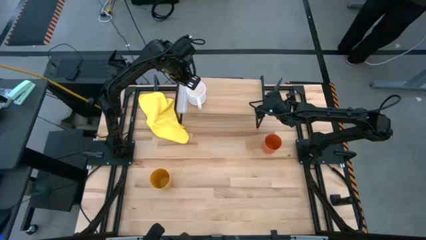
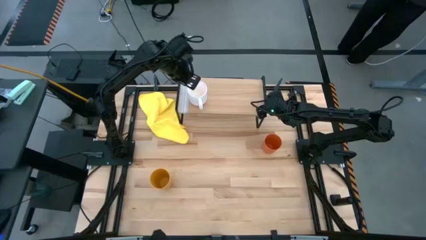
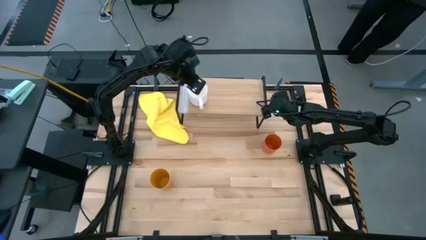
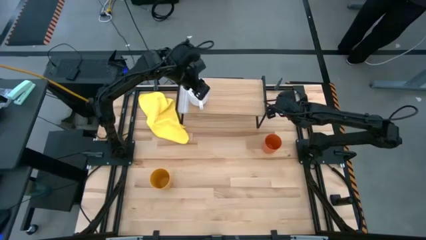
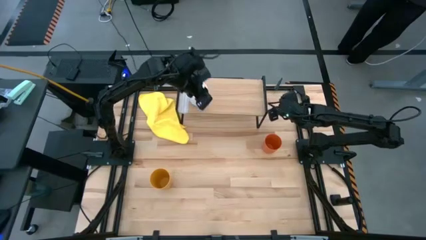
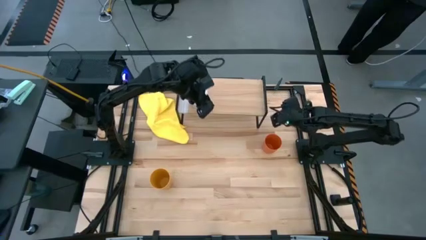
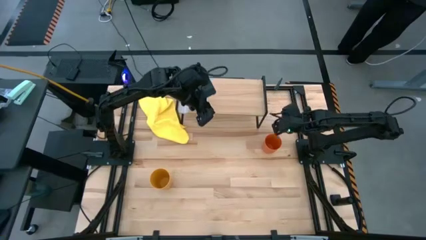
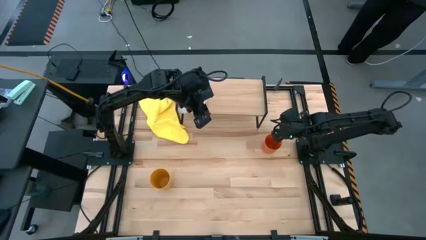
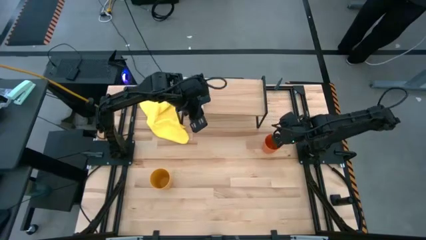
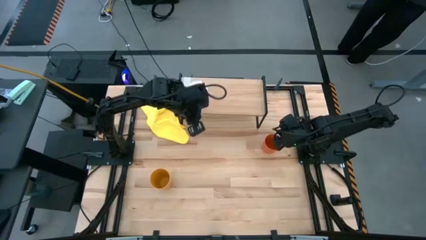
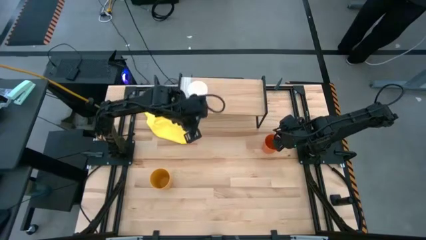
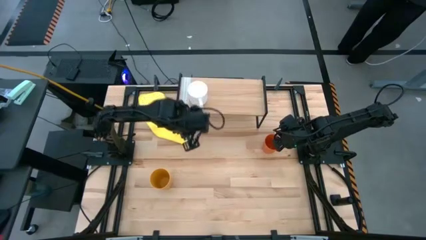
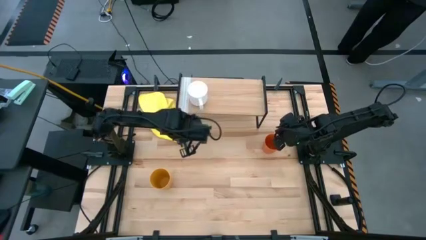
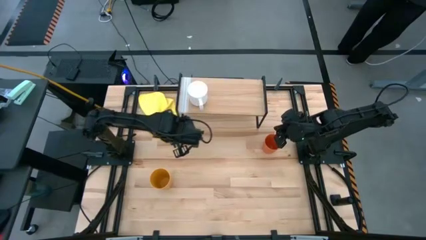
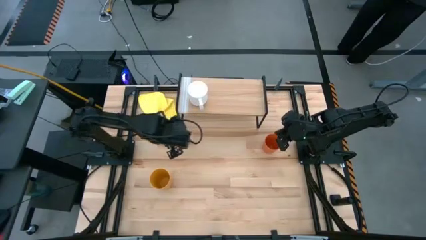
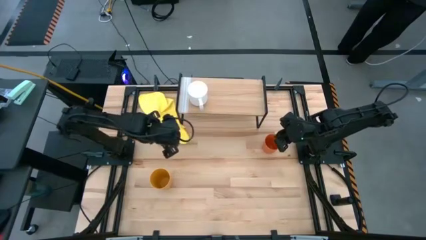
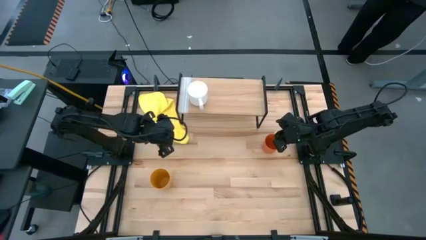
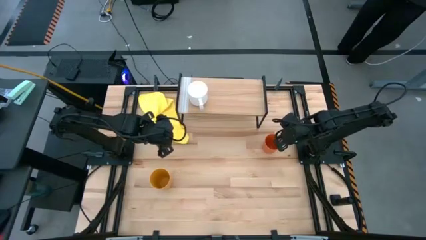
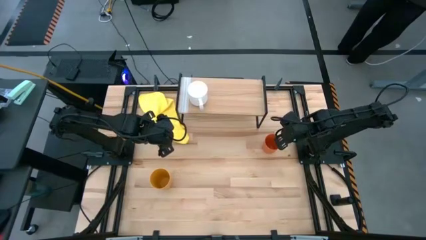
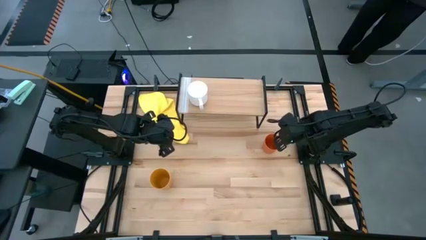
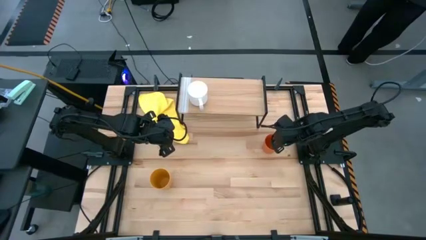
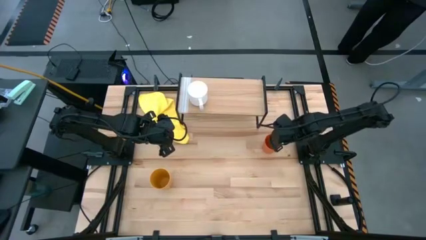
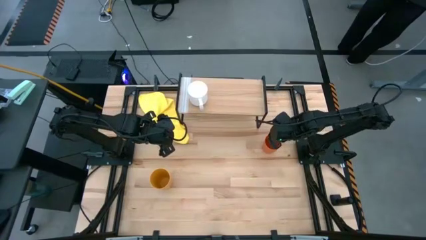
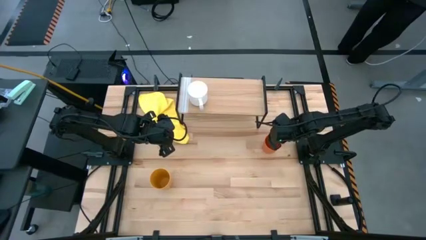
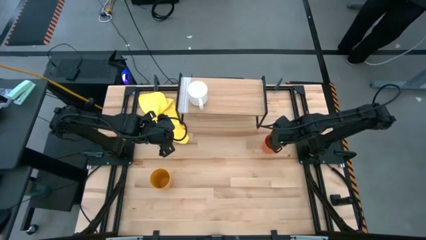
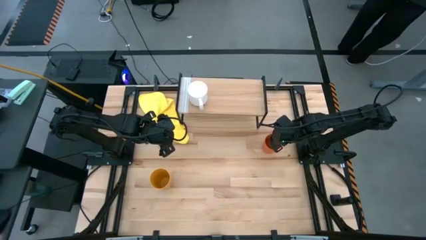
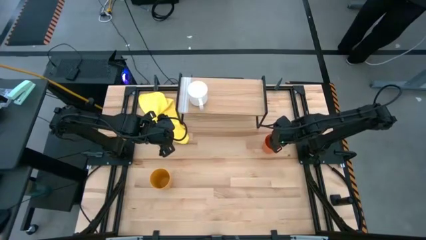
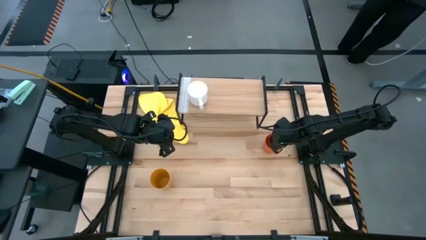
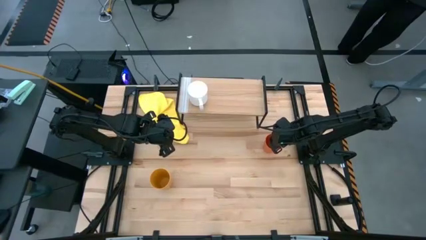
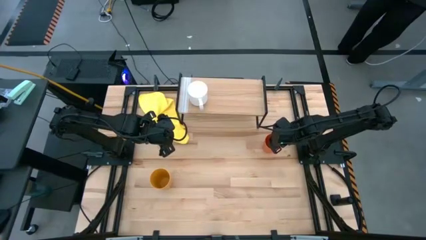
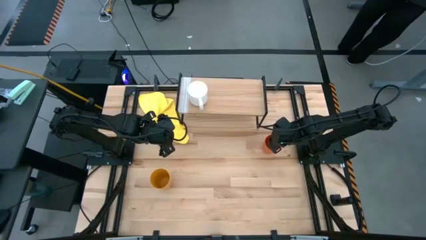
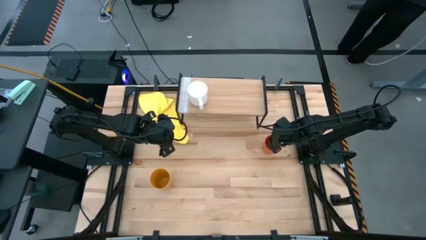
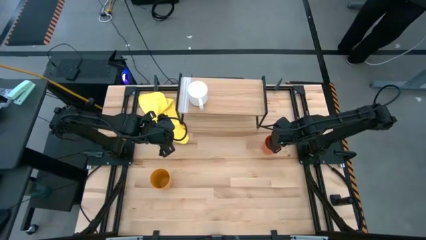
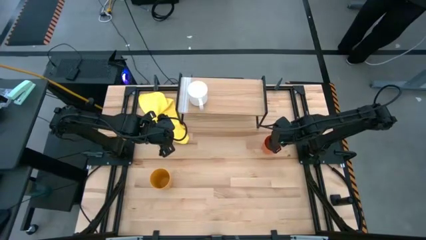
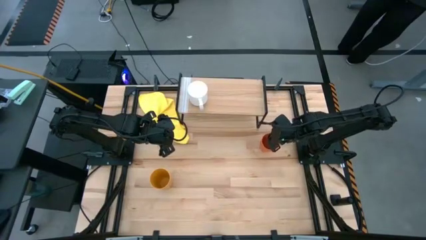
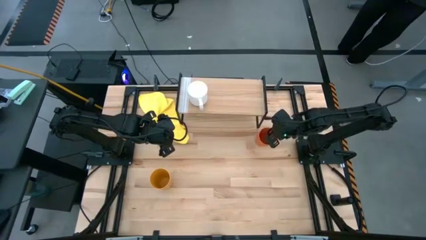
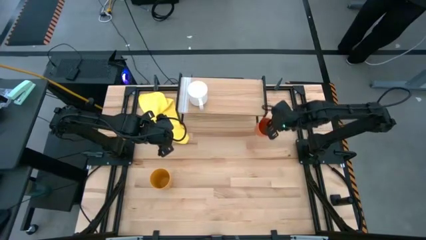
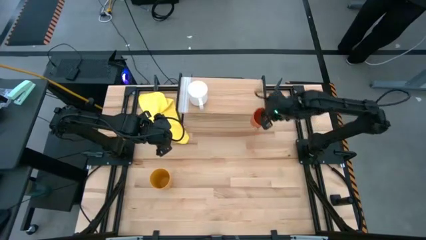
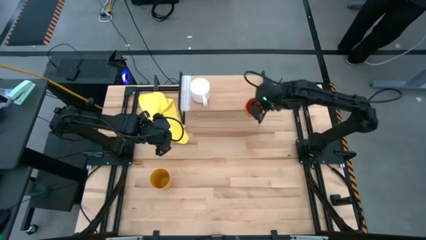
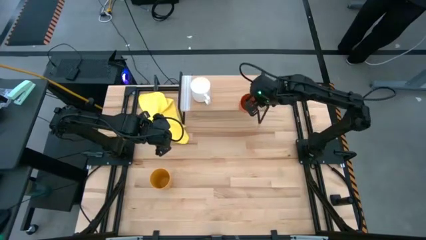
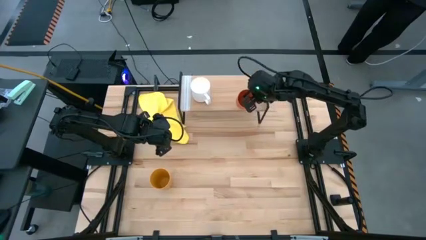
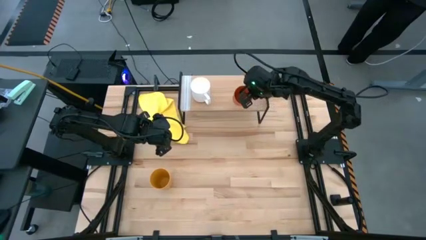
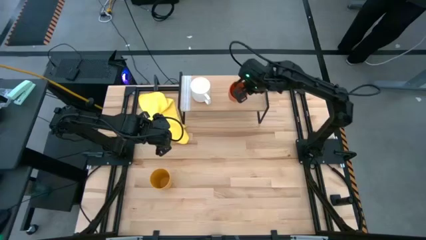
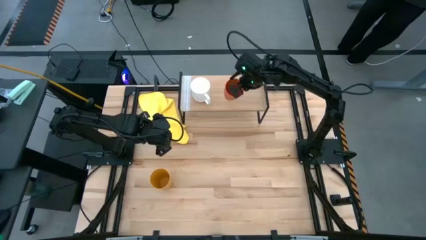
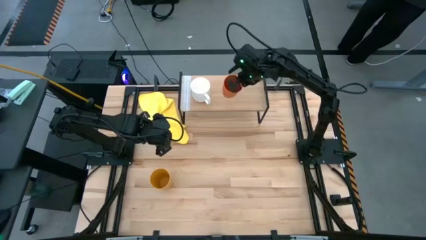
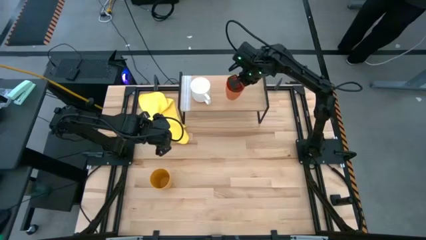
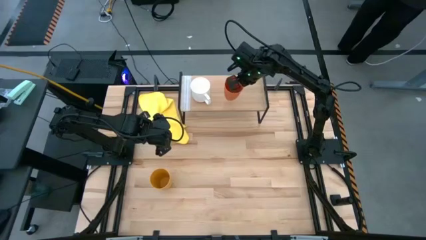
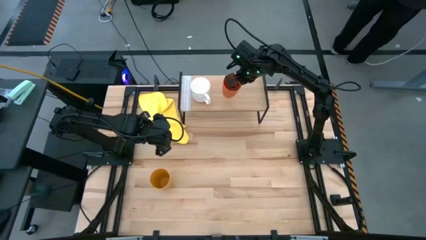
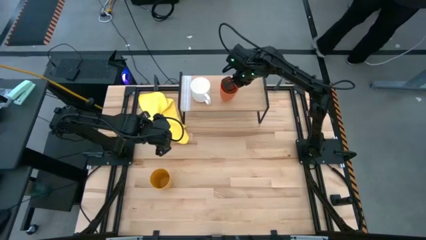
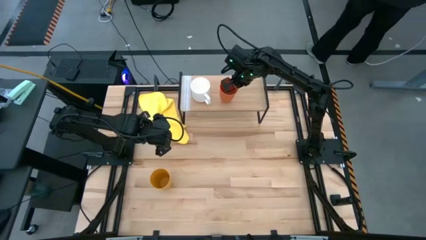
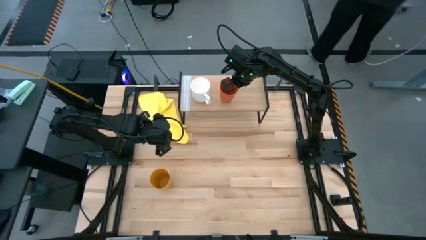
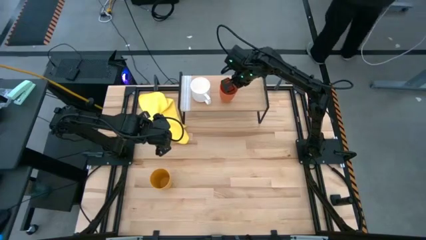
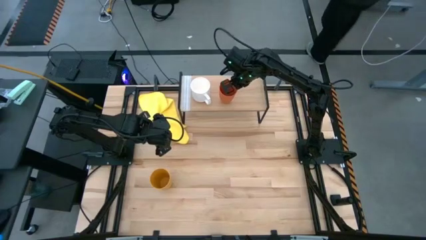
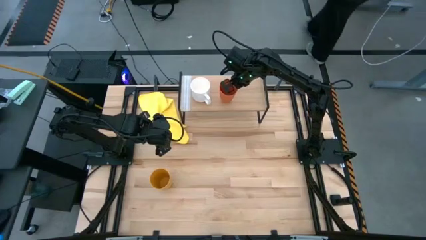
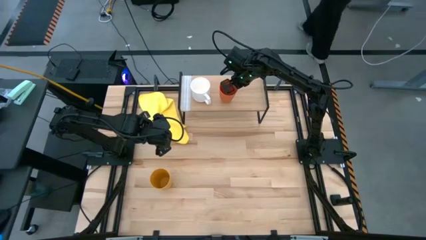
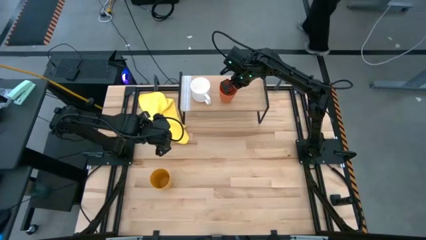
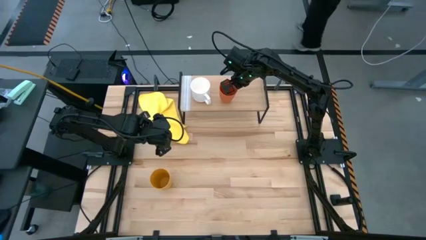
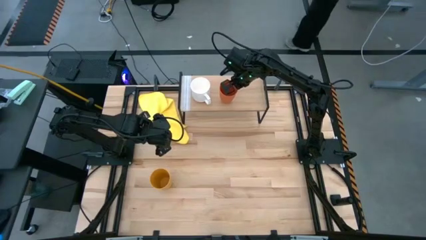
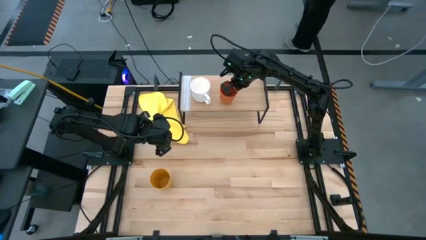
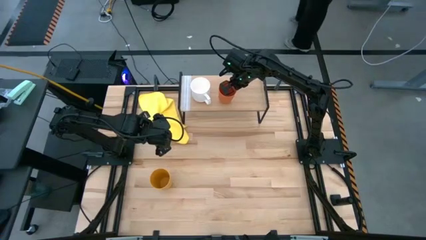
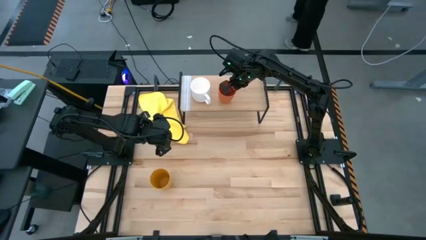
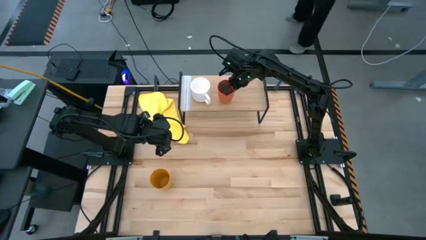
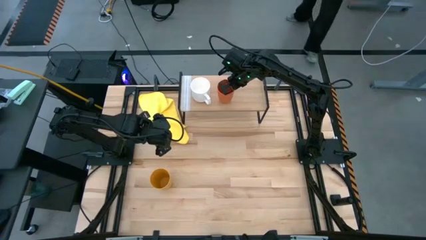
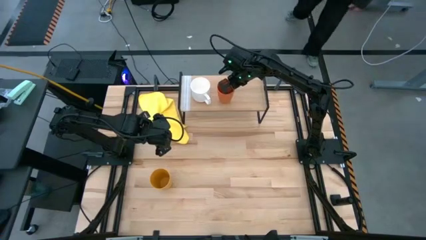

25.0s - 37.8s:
Task: Stack small to large cups/mugs on shelf
Put the orange cup on the shelf
